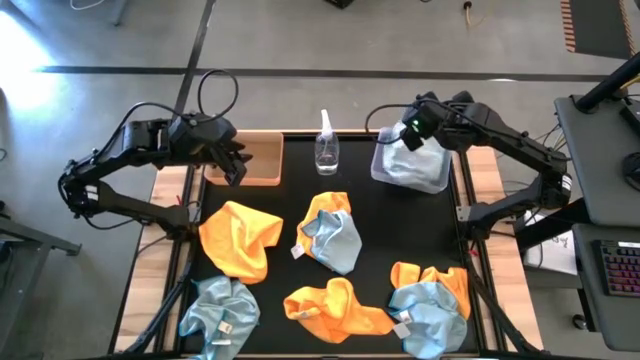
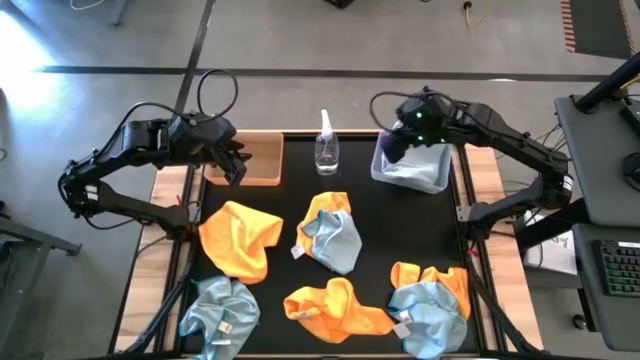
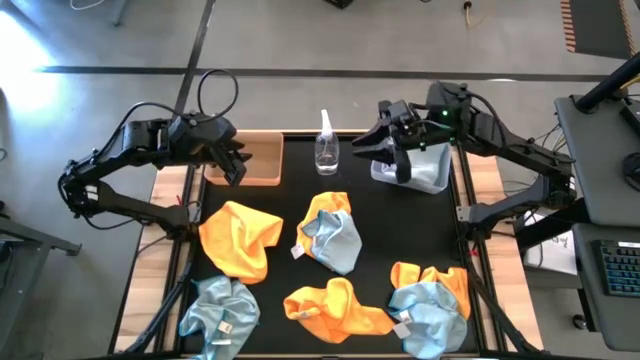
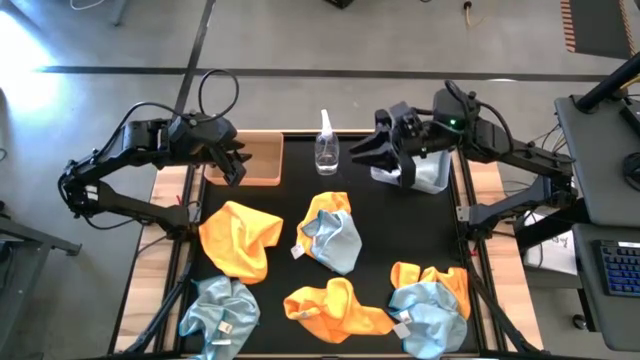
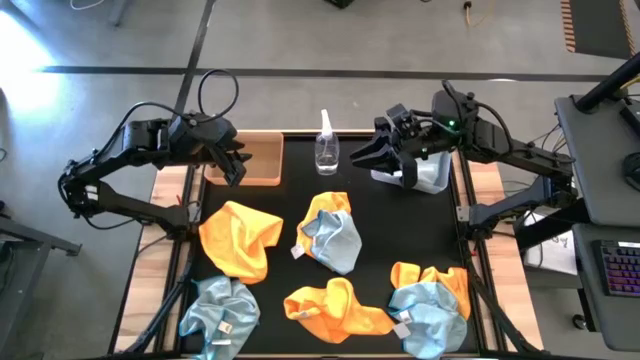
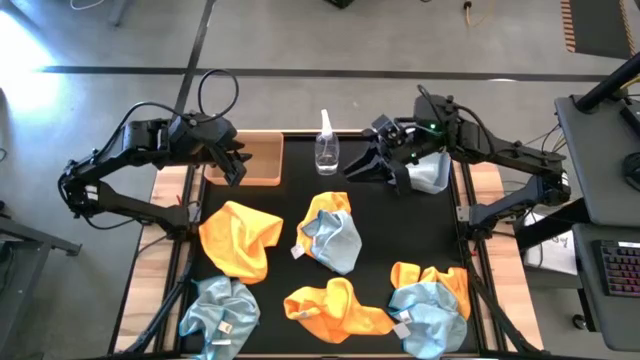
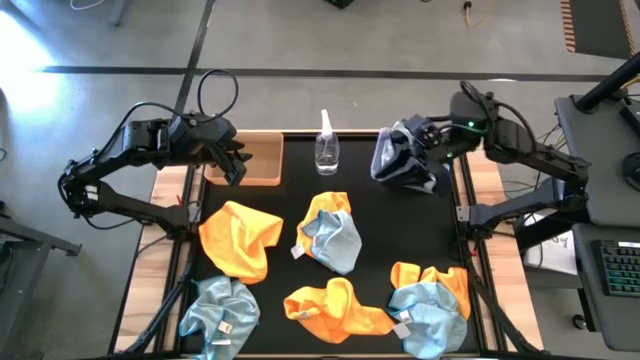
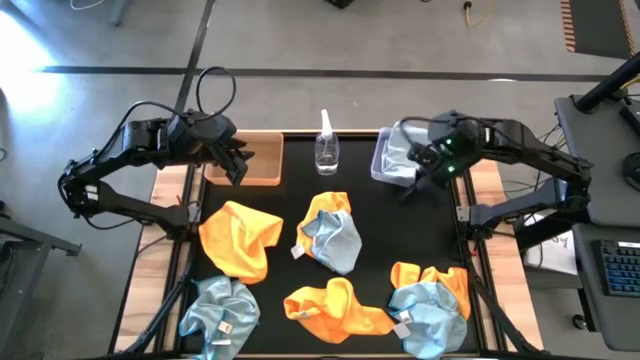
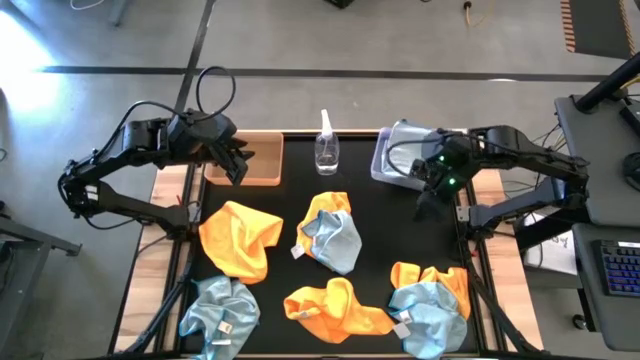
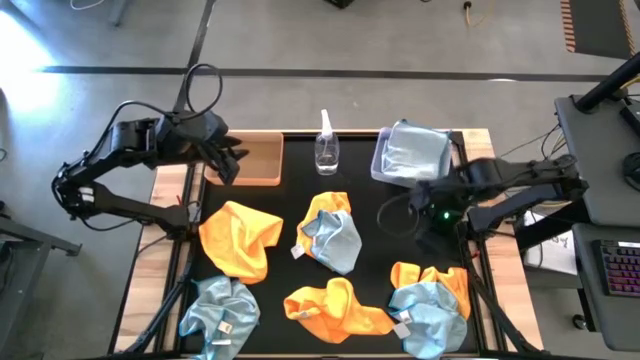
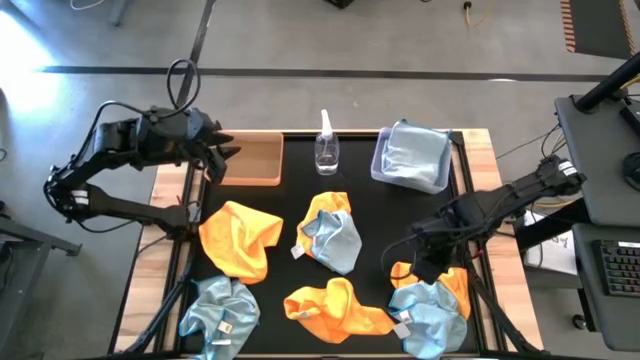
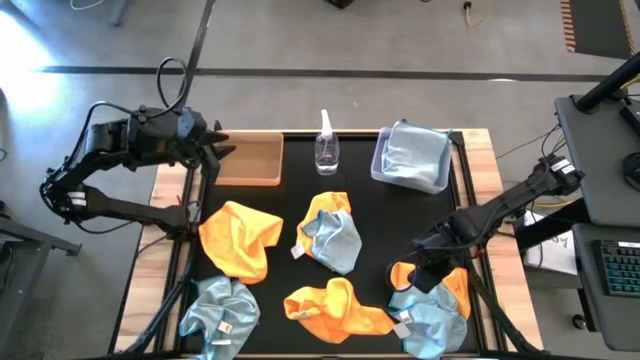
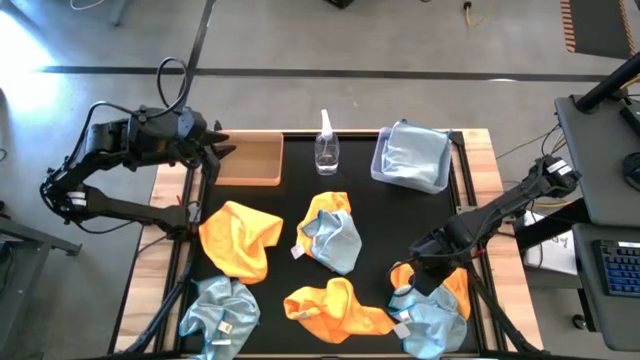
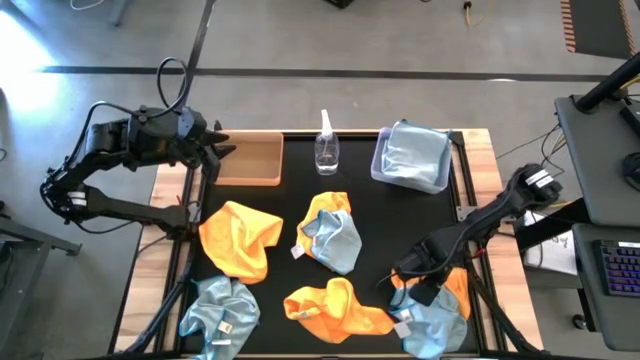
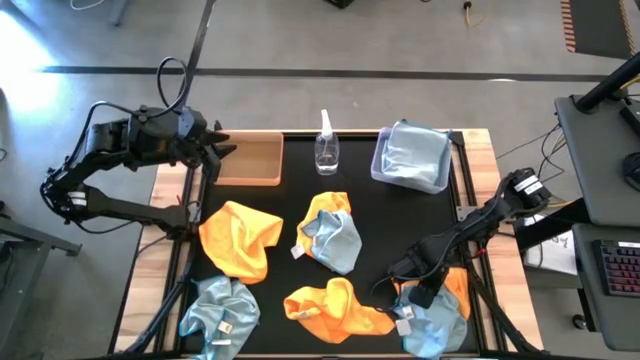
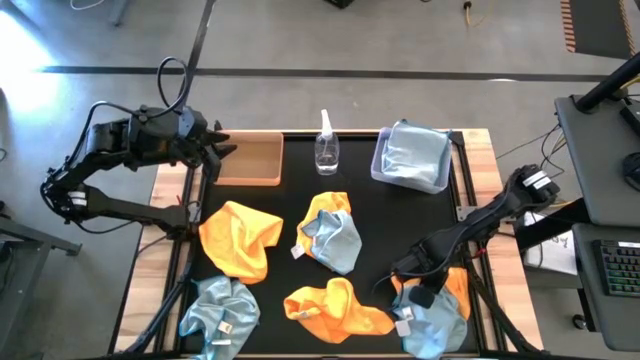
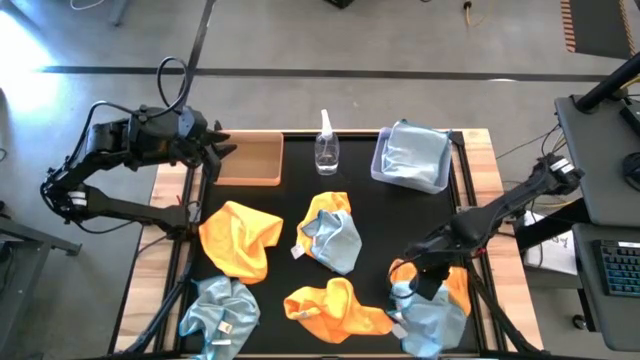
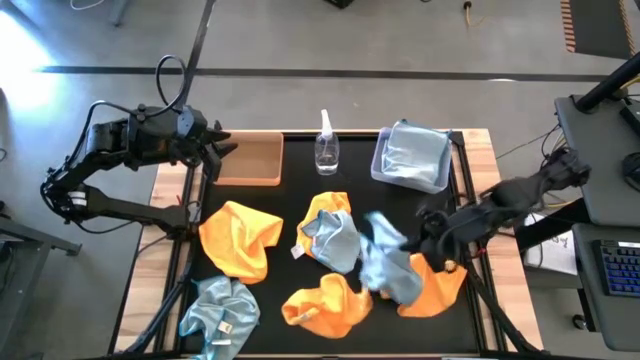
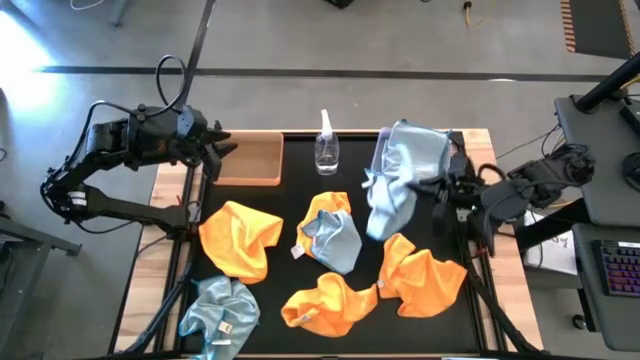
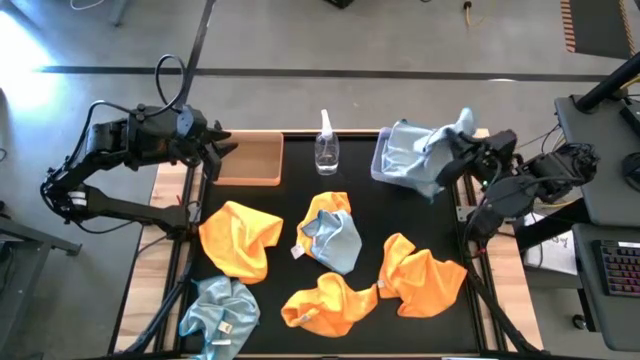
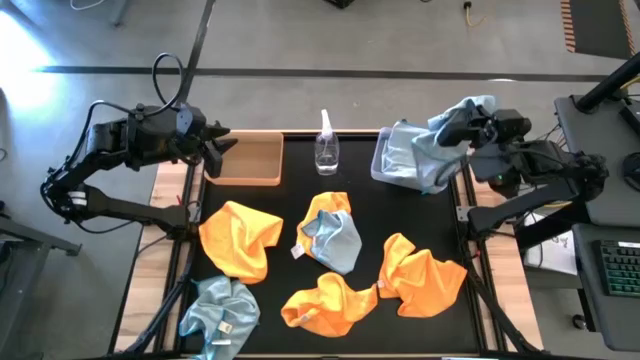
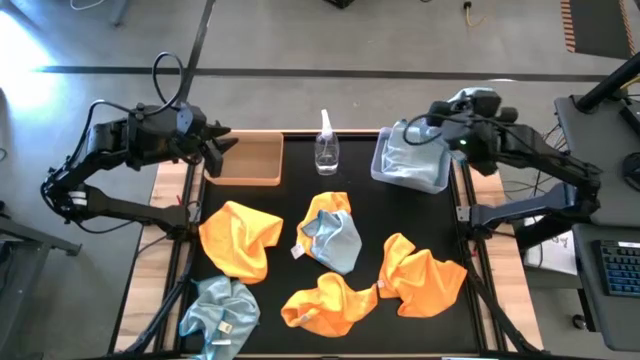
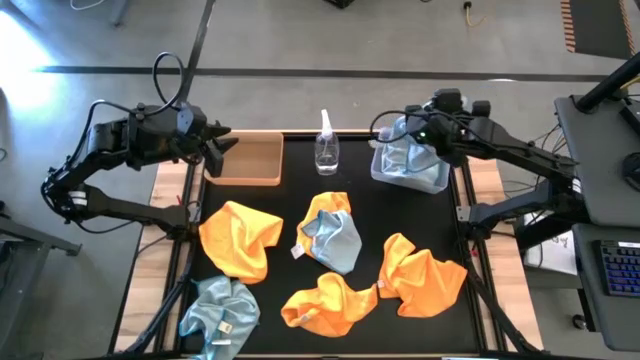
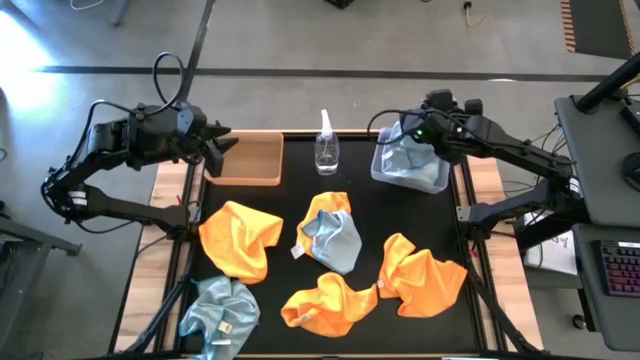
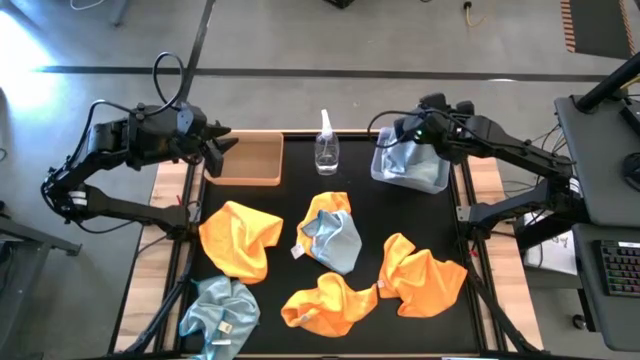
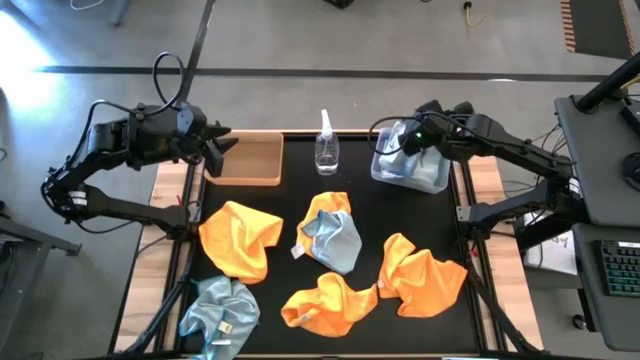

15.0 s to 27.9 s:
Task: Sort microfiber towel by color & place in baskets
Put the blue towel into the transparent bin

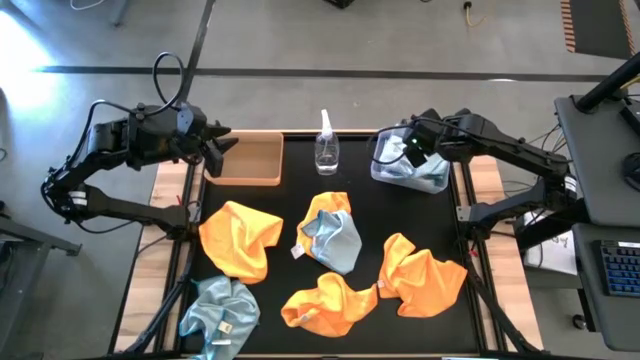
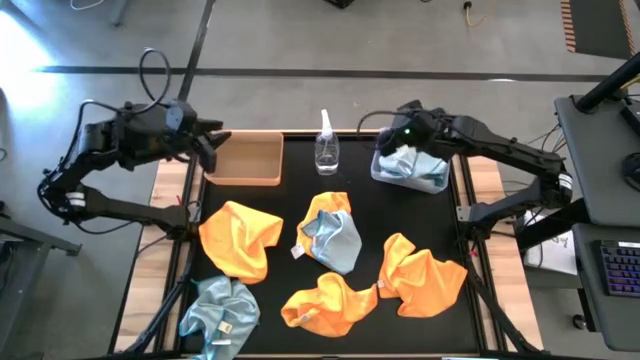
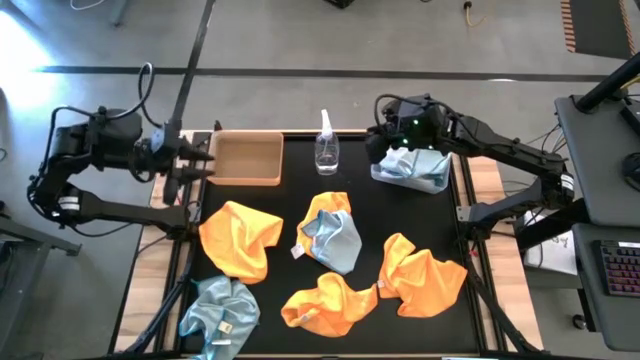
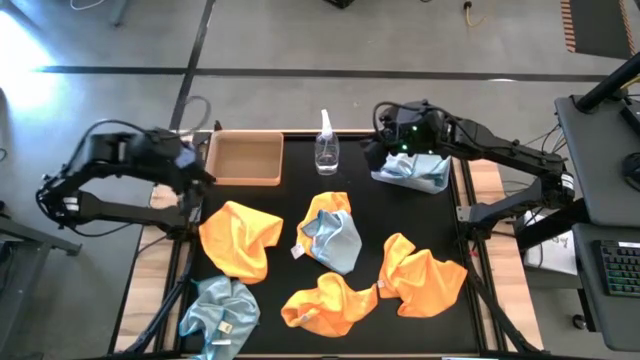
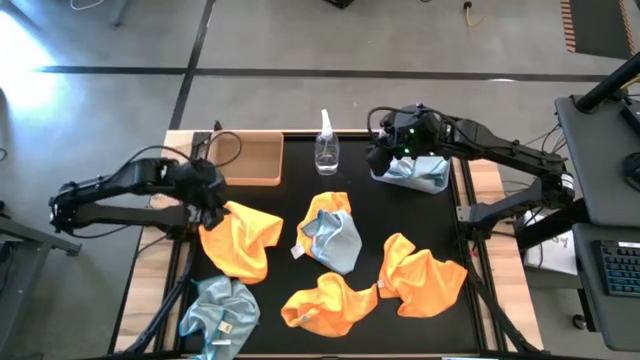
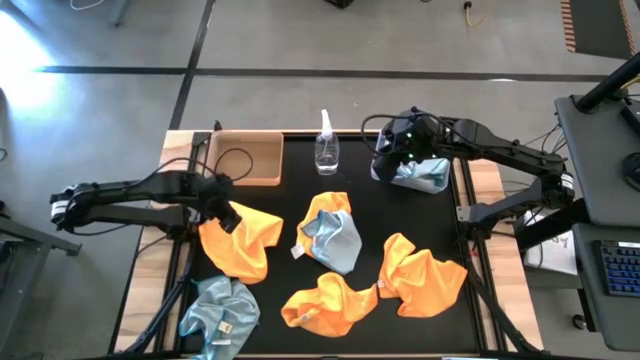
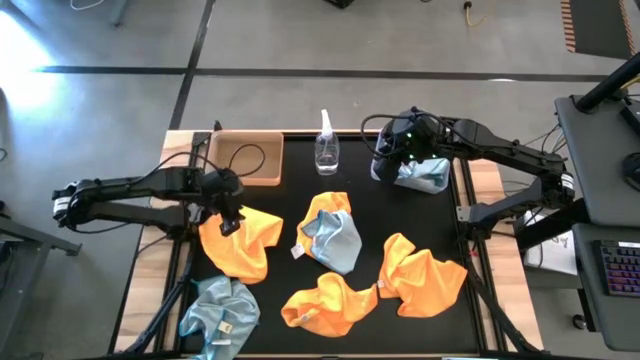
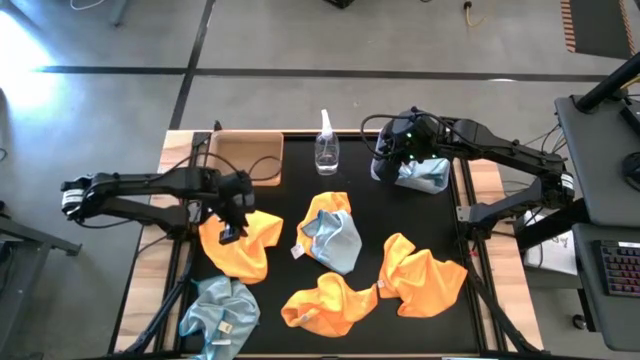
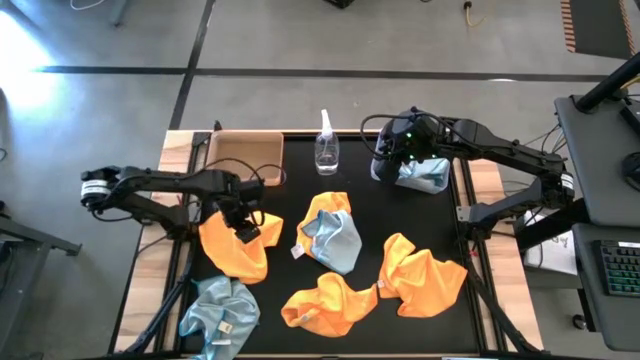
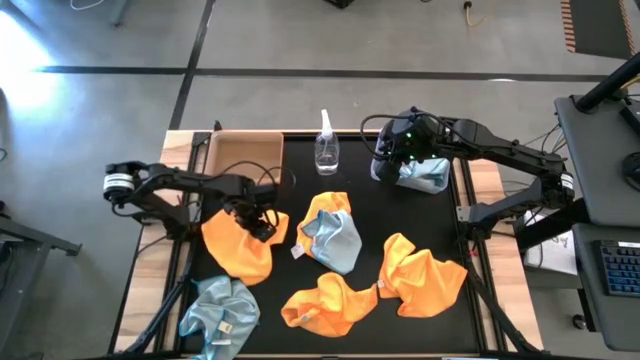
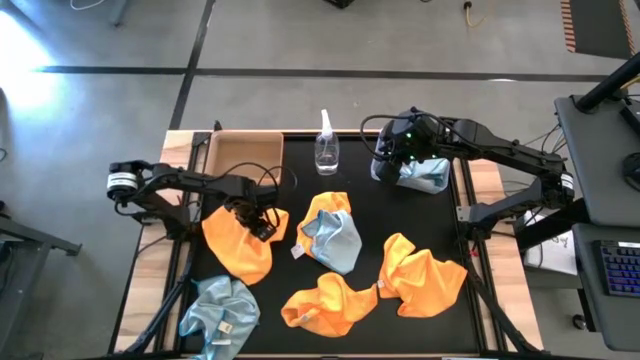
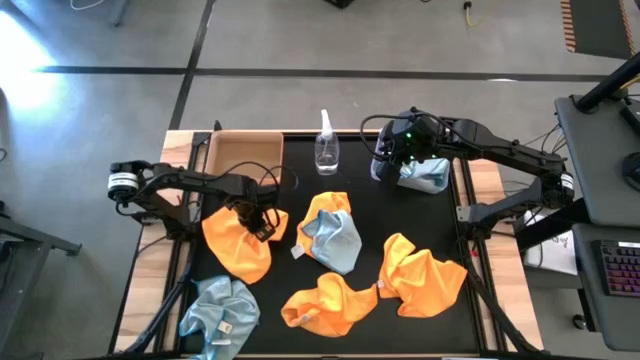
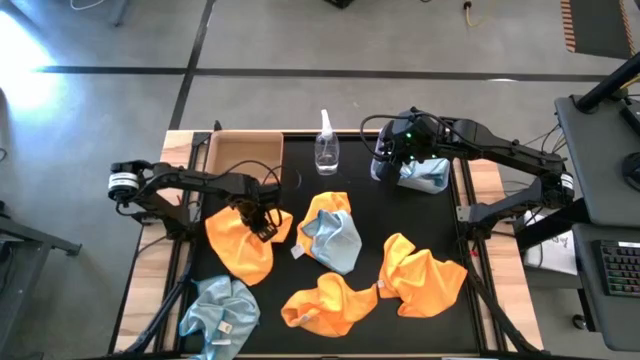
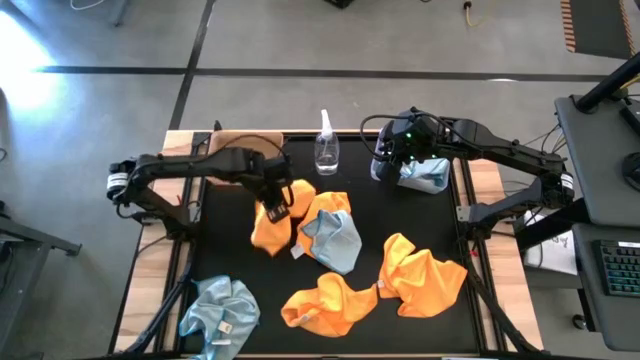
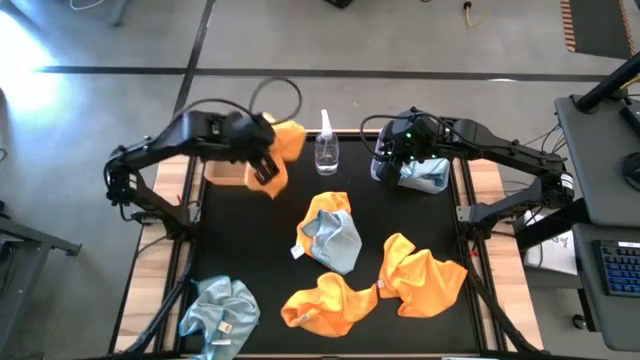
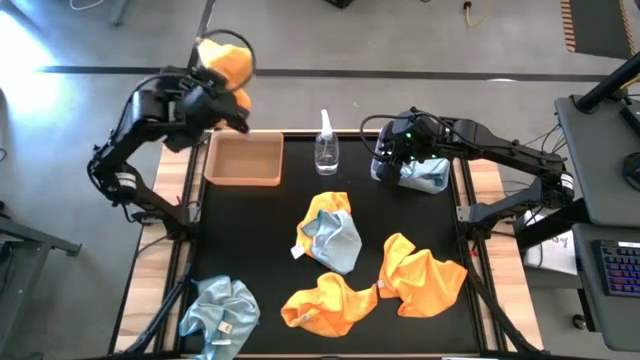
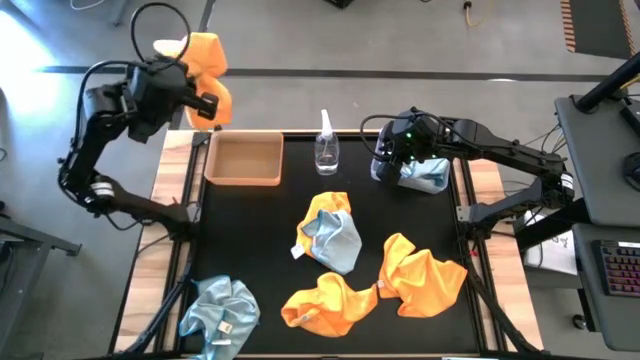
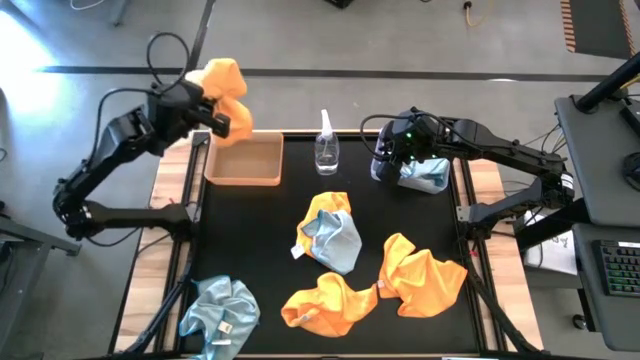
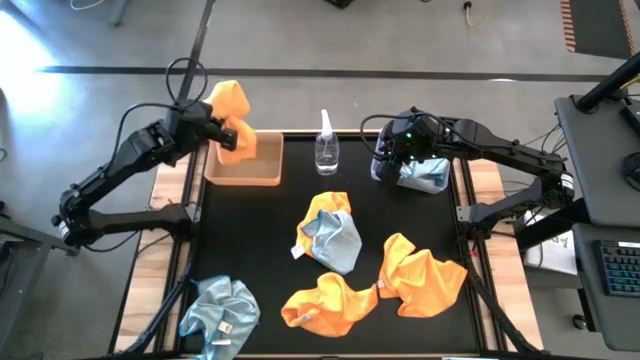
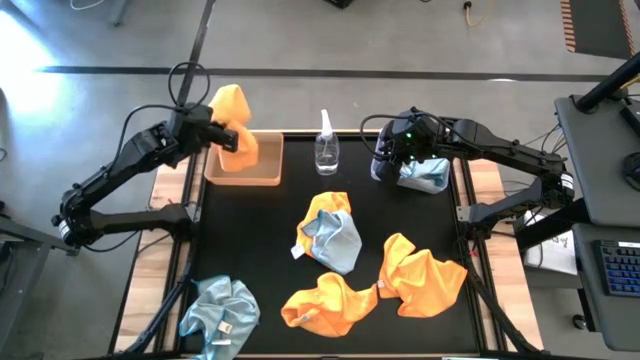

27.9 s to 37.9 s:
Put the yellow towel into the orange bin
